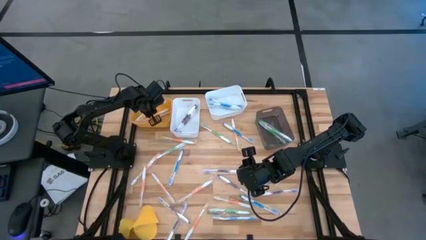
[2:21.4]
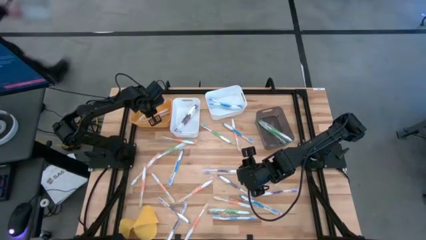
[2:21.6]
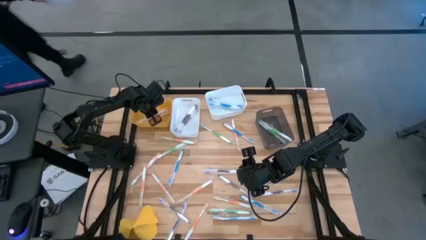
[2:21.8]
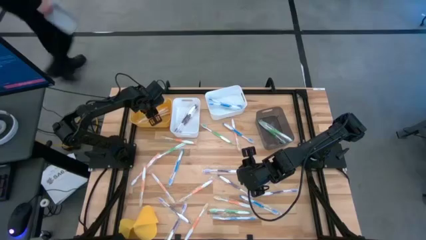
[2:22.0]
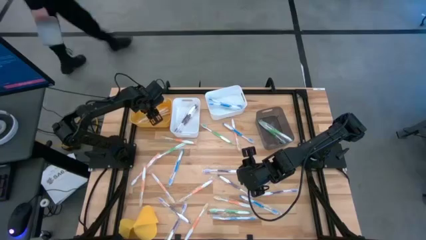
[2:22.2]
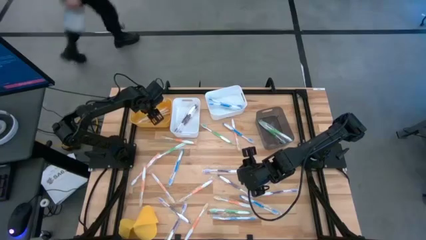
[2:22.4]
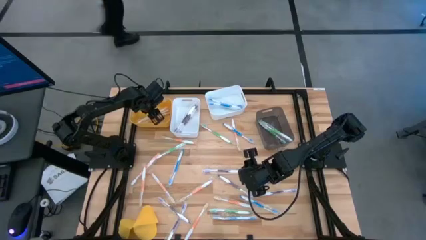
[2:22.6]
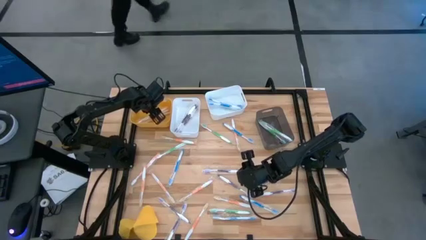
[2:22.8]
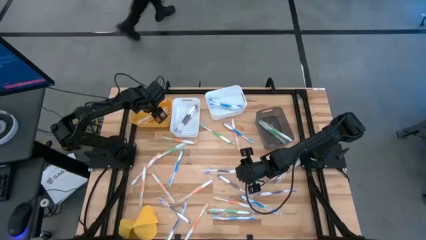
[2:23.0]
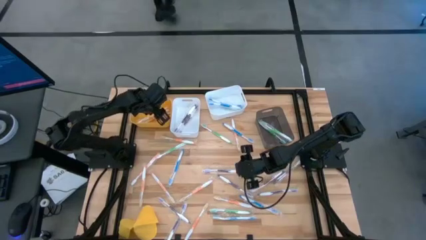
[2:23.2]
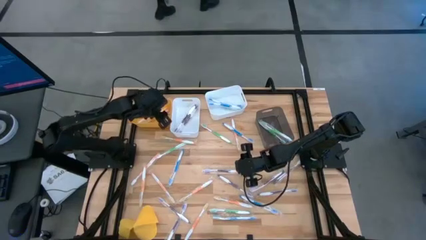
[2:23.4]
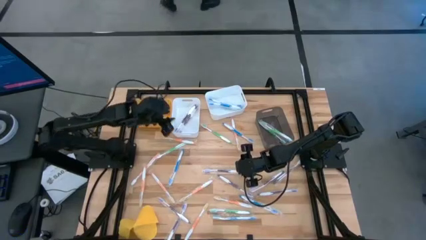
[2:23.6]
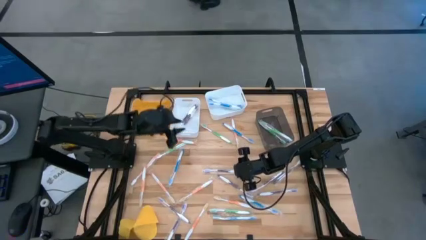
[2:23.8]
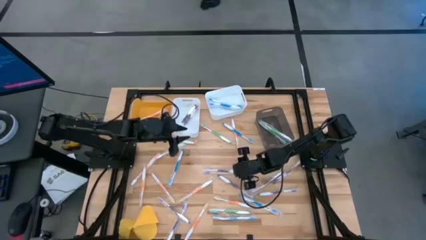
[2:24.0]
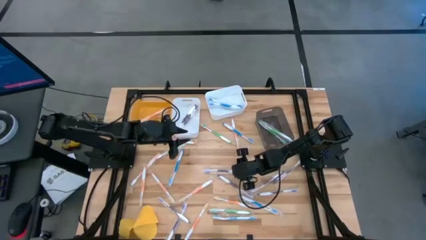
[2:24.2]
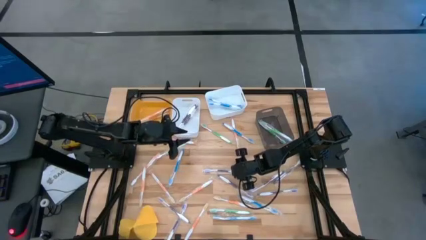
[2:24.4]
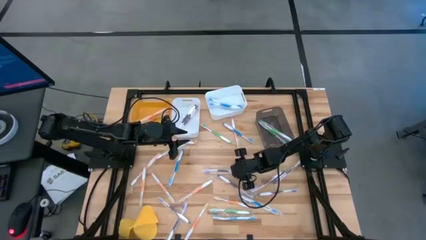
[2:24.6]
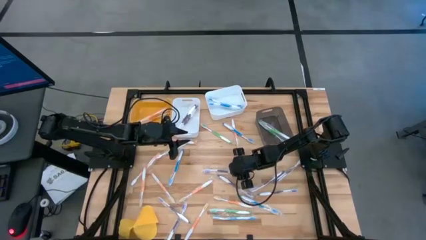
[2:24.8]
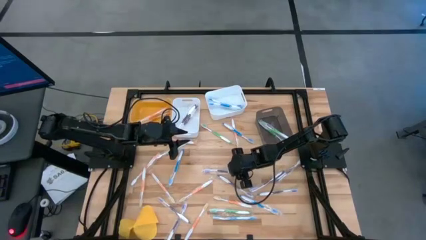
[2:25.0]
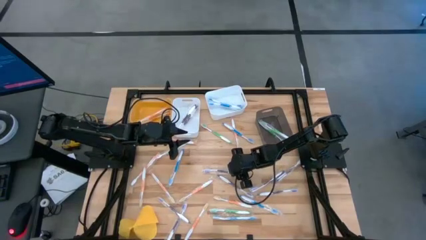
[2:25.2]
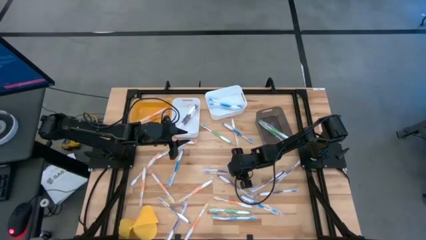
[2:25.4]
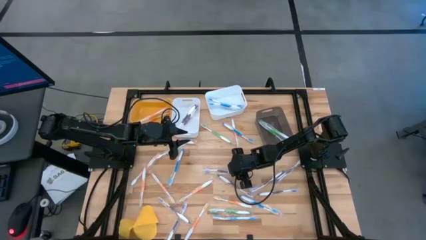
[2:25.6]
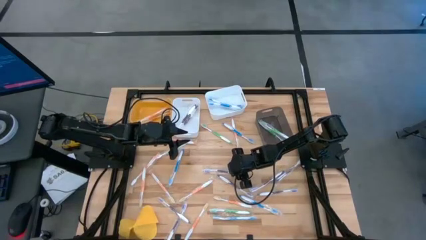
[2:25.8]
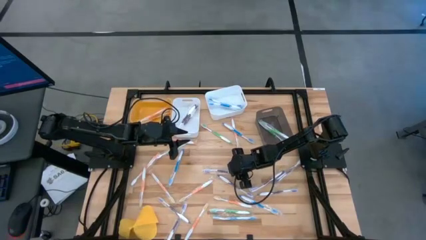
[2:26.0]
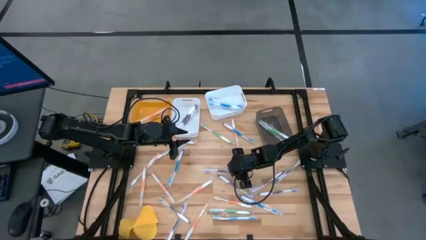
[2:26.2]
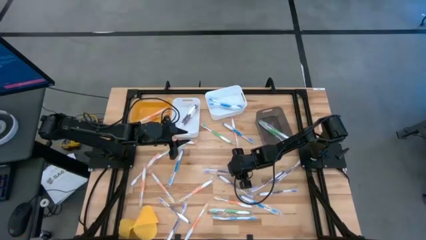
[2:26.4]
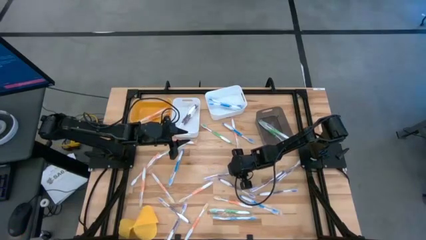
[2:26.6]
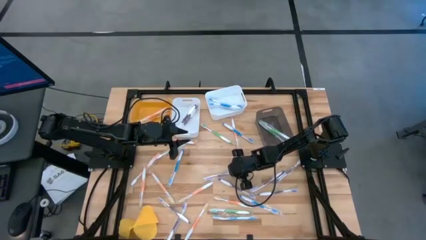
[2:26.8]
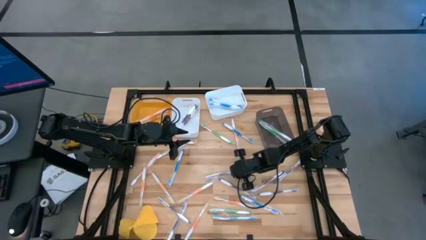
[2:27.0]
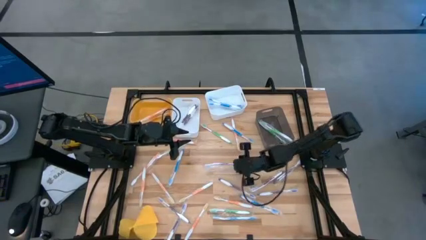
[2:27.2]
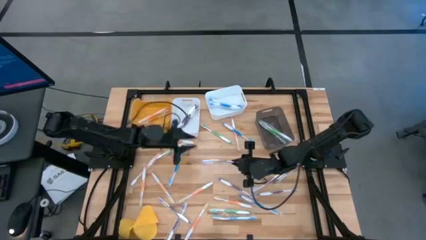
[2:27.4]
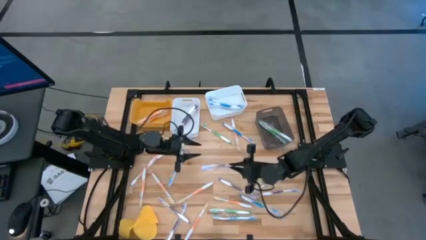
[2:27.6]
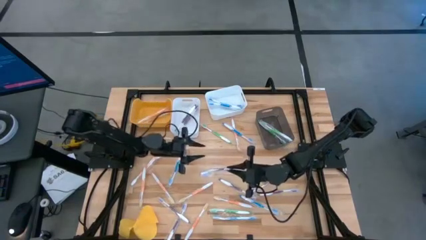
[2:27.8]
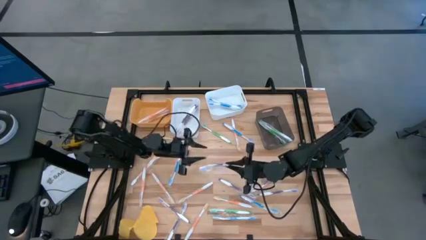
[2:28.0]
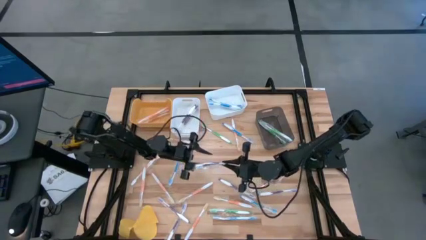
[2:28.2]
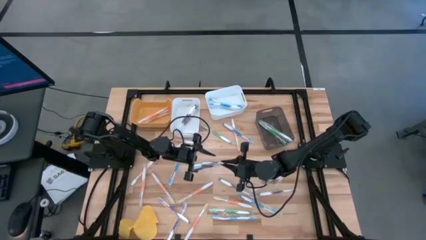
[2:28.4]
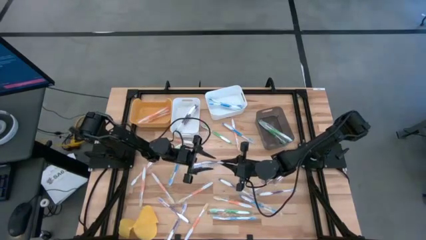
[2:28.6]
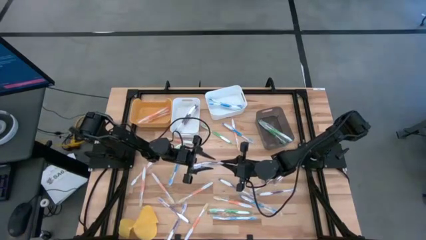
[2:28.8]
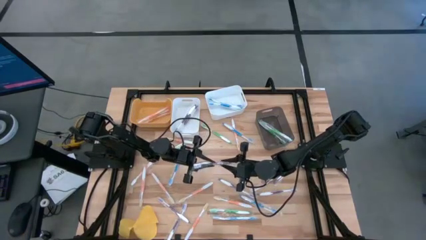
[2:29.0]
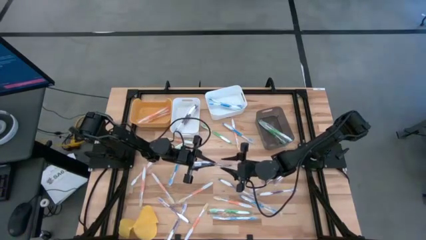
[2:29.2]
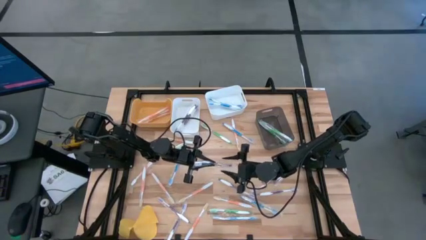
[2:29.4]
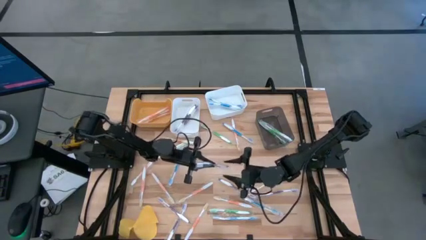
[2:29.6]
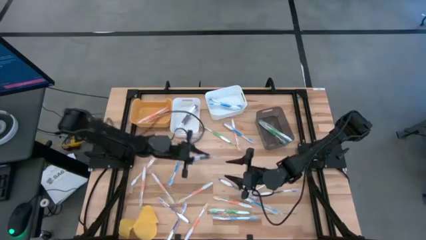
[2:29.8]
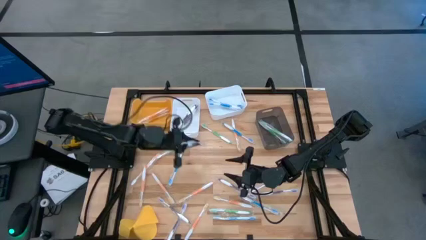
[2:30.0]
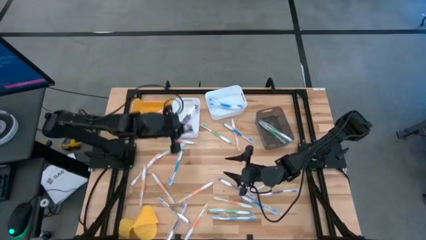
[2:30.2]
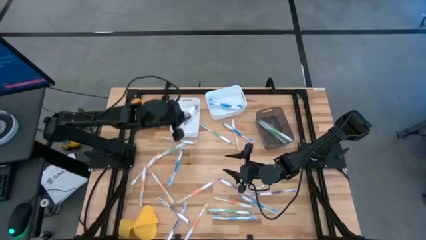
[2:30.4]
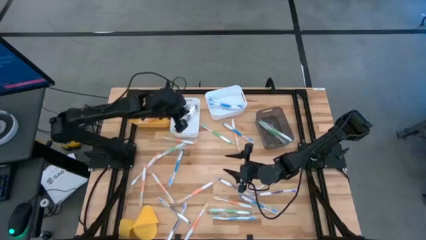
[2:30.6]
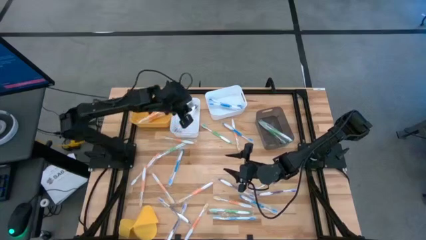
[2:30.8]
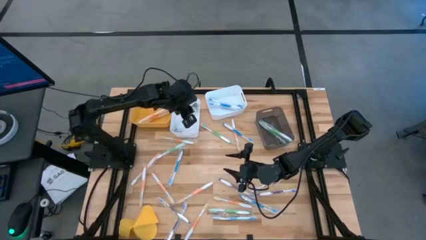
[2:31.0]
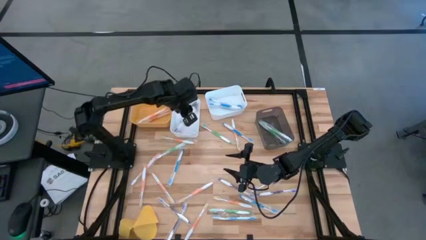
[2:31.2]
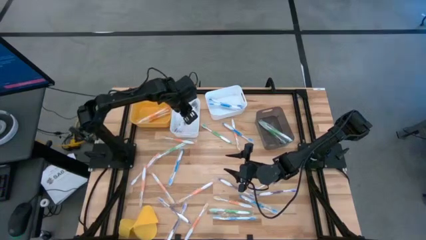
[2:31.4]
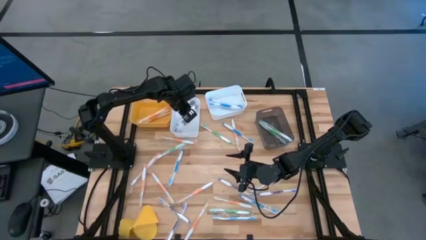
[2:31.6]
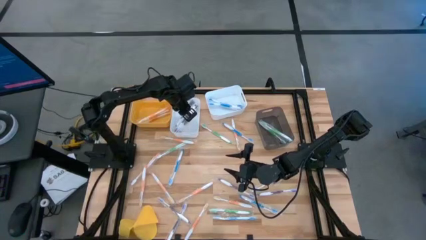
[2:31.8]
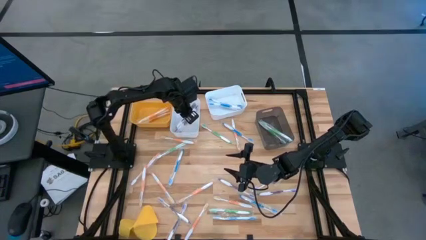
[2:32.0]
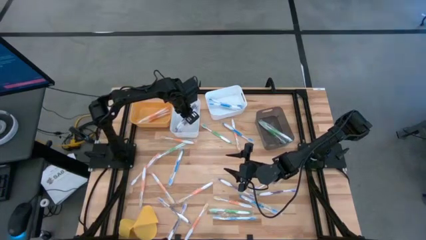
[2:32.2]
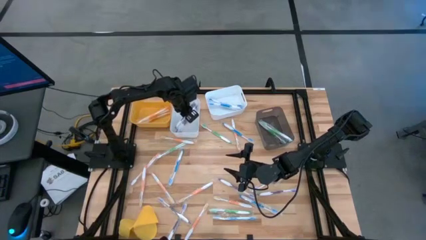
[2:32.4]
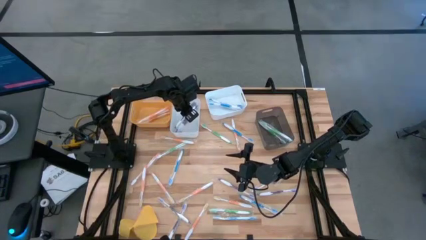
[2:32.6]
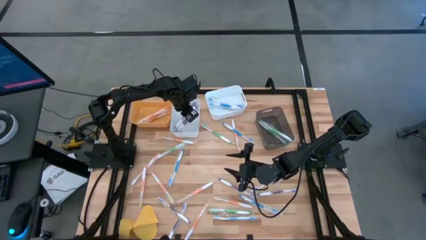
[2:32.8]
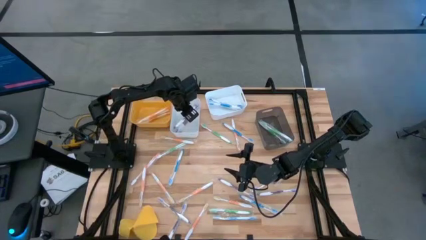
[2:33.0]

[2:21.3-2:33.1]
Task: Pick & Place Toothbrushes
Put the purple toothbrush into the left white bin

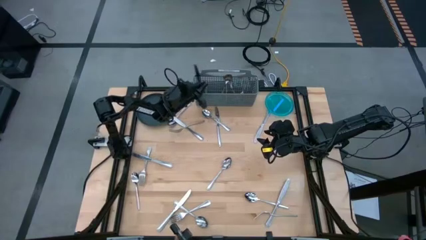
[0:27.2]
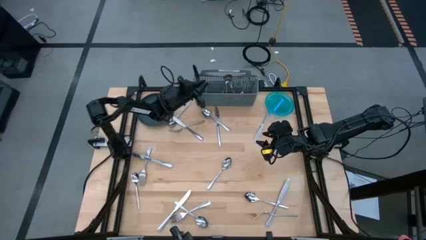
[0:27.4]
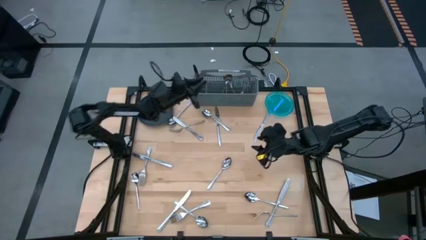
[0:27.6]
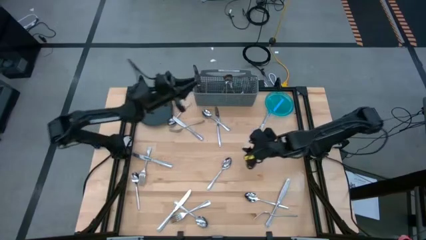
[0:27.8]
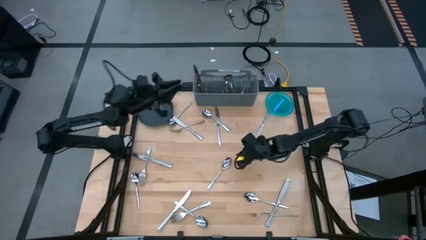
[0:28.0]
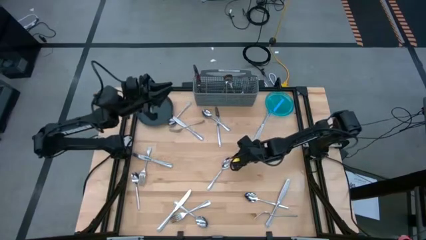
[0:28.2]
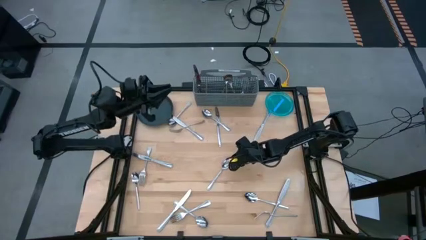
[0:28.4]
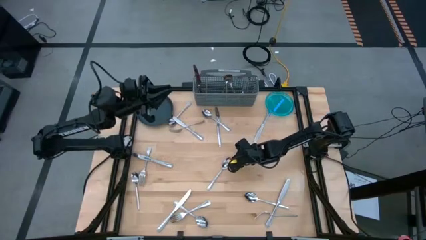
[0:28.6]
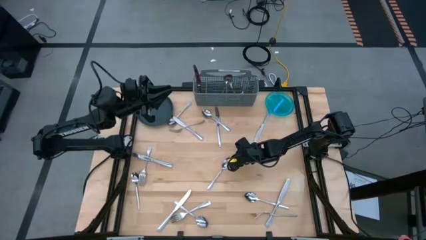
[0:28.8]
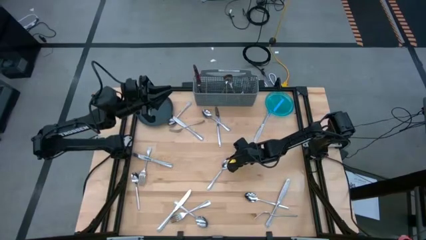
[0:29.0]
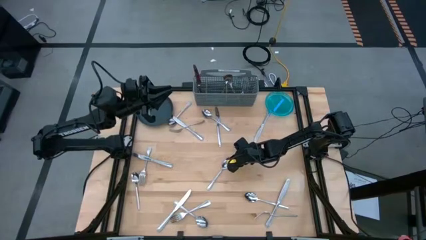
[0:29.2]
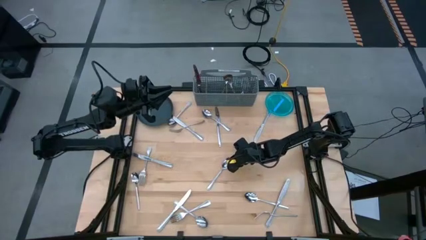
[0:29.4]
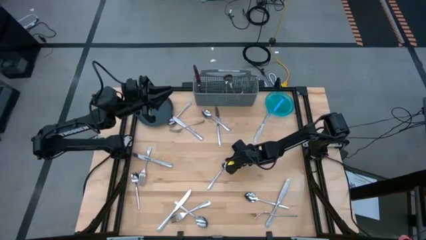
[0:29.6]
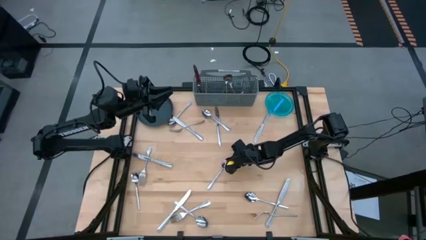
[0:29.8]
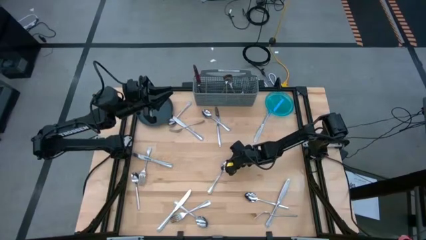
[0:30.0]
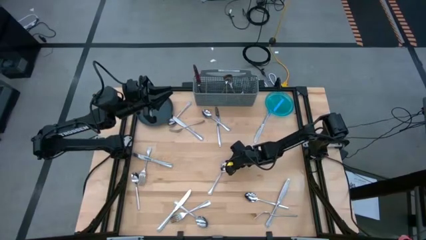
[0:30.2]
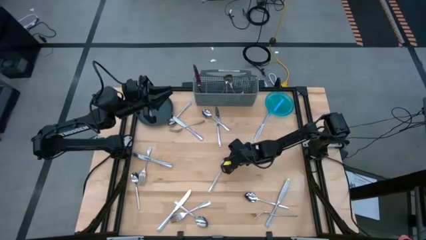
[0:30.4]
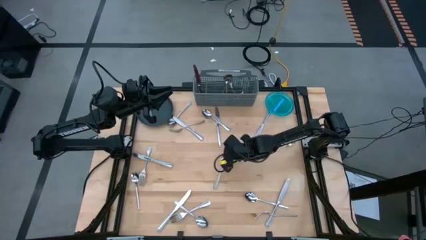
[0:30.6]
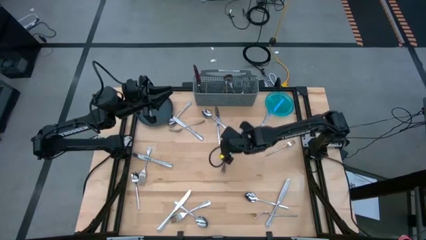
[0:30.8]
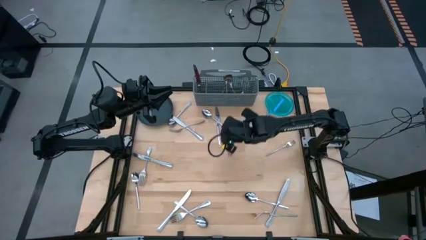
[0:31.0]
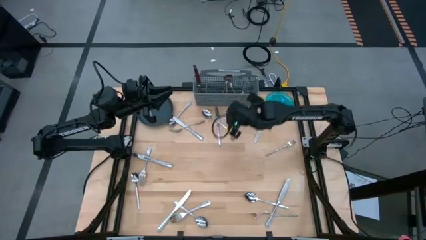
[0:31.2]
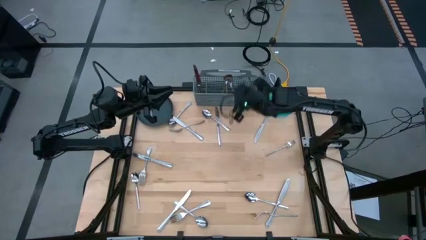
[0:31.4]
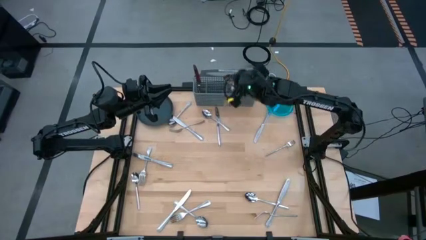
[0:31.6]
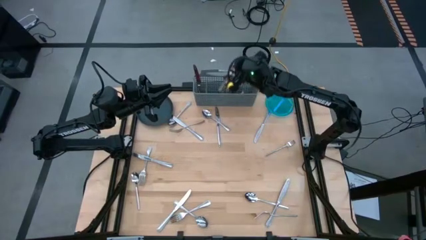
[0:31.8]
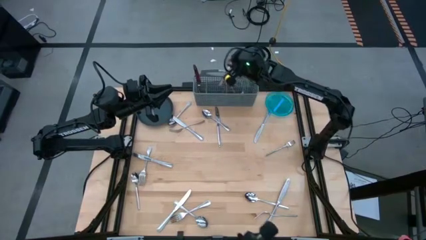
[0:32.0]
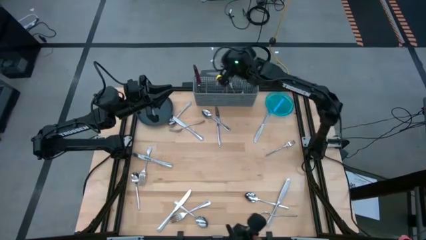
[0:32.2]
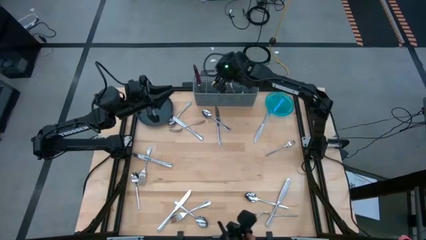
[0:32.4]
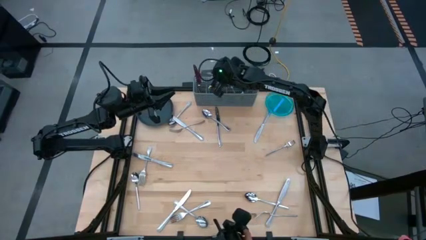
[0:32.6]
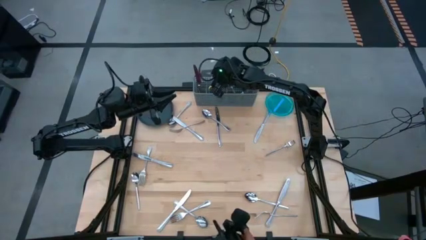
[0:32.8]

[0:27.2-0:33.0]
Task: Sort silverware
Put the spoon into the silverware basket
